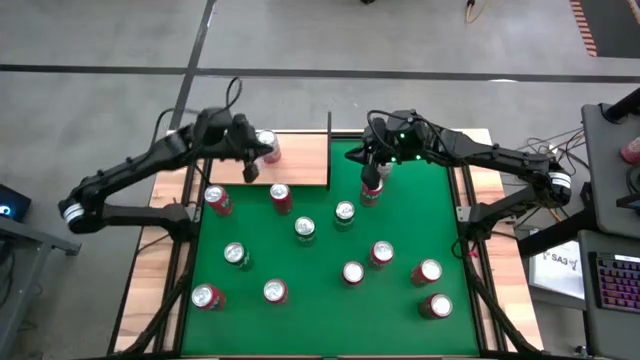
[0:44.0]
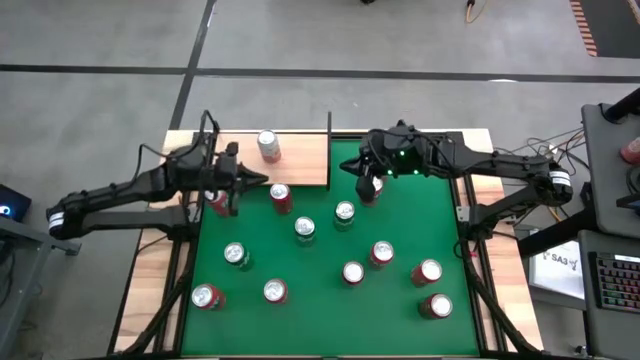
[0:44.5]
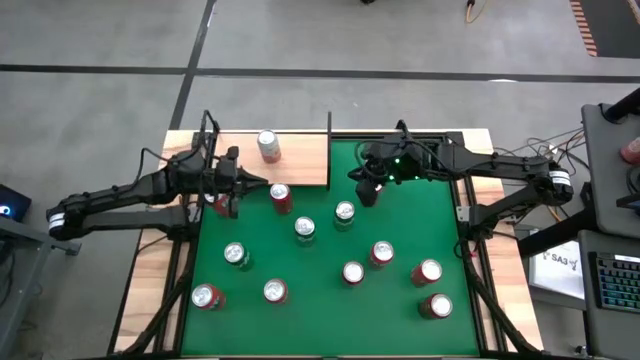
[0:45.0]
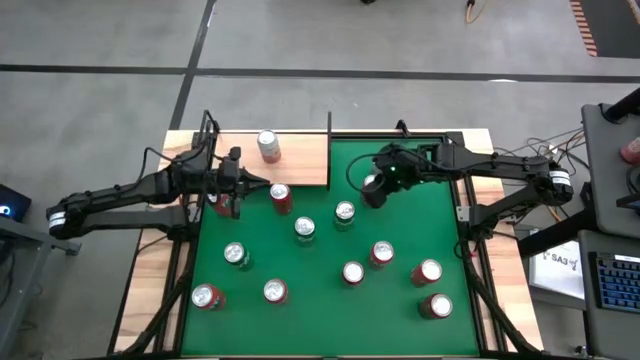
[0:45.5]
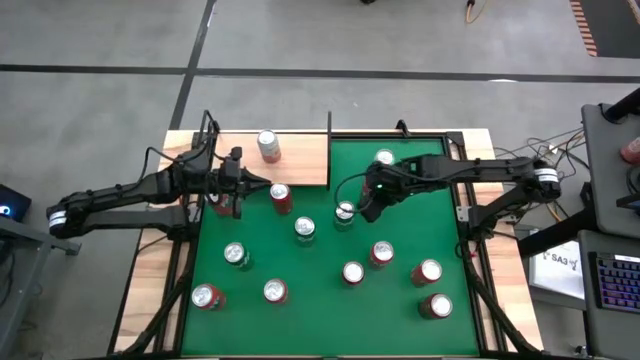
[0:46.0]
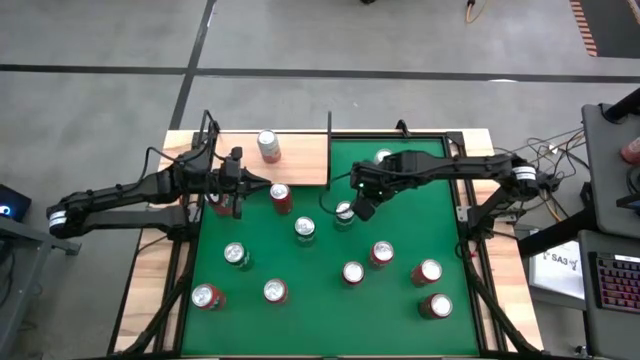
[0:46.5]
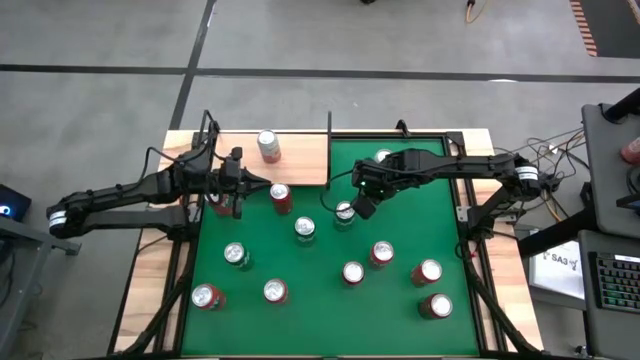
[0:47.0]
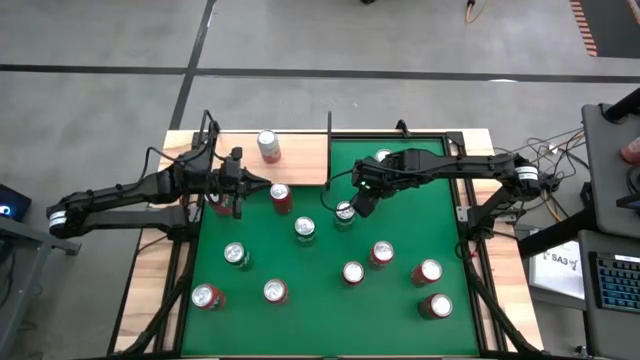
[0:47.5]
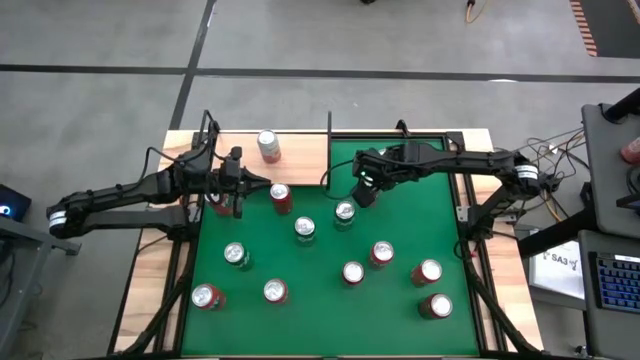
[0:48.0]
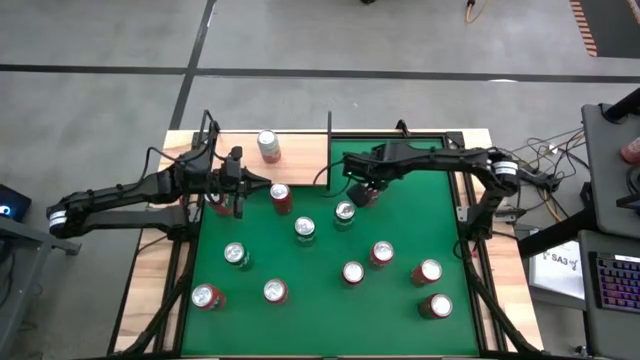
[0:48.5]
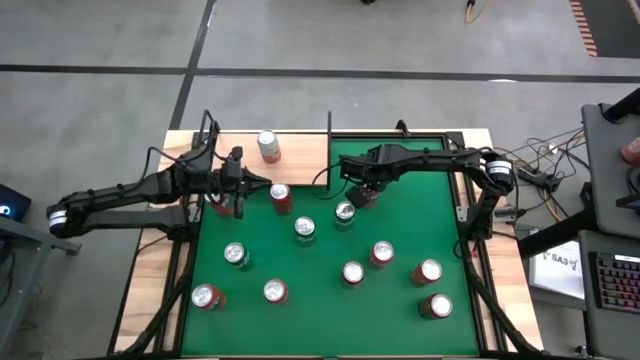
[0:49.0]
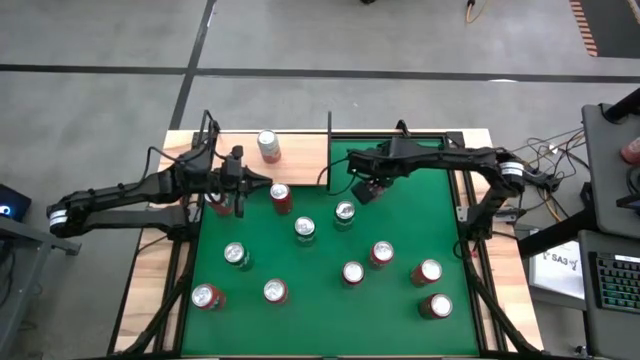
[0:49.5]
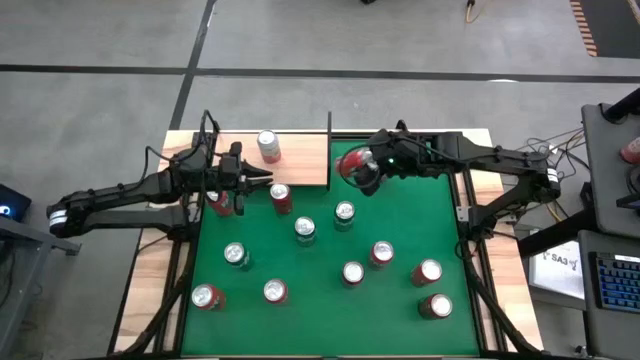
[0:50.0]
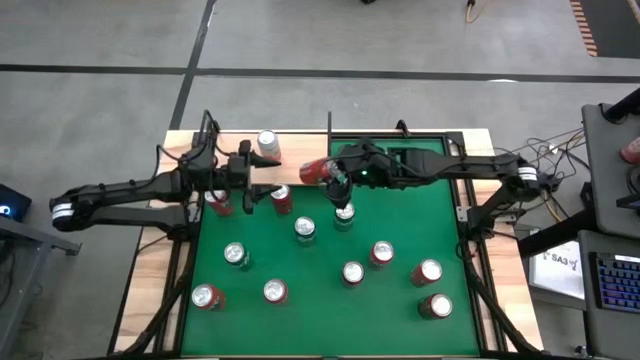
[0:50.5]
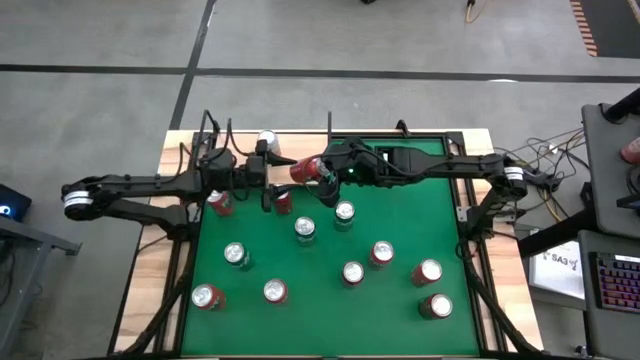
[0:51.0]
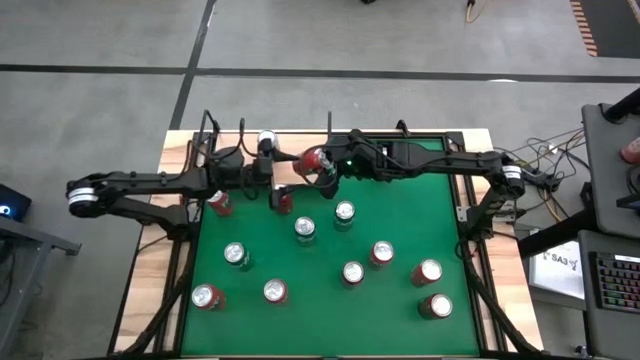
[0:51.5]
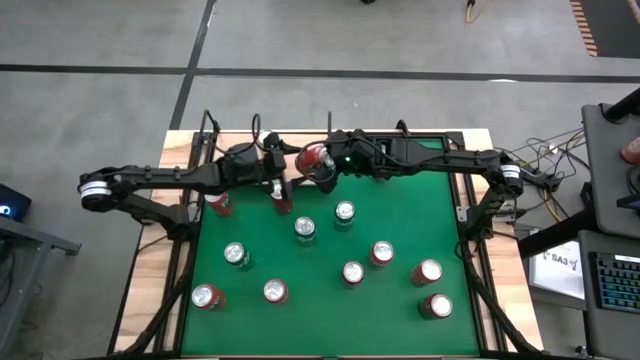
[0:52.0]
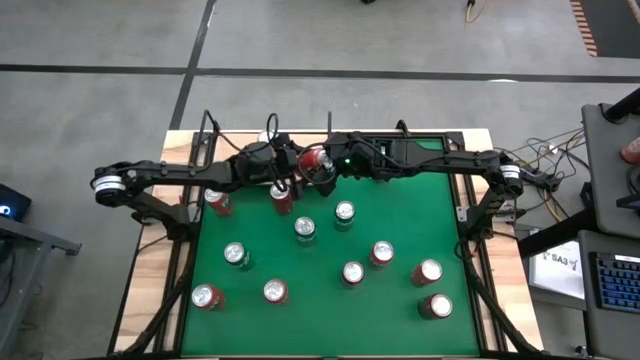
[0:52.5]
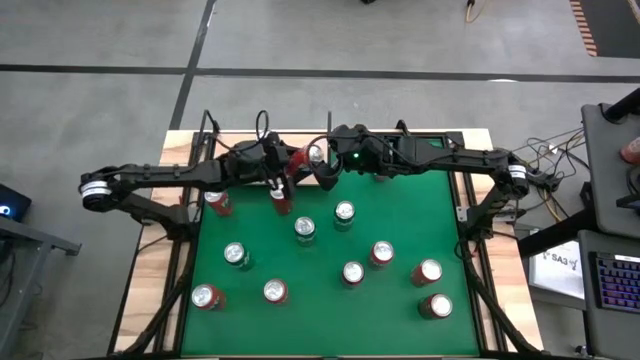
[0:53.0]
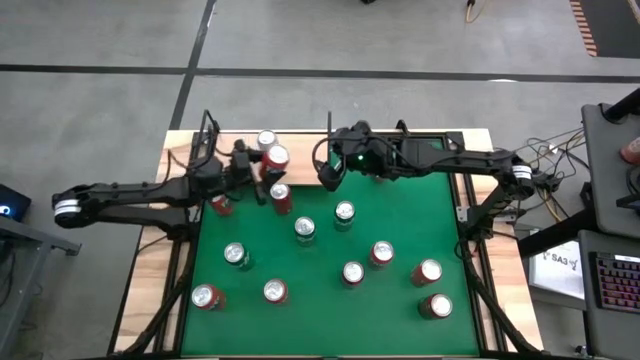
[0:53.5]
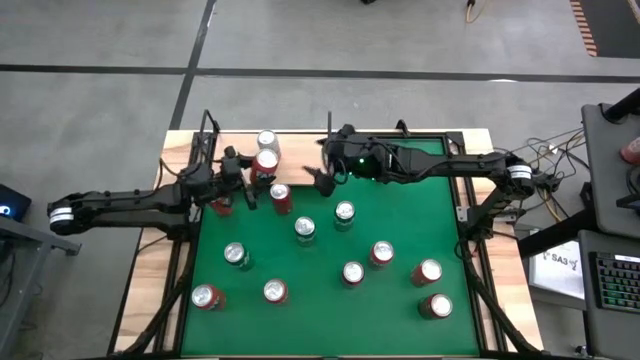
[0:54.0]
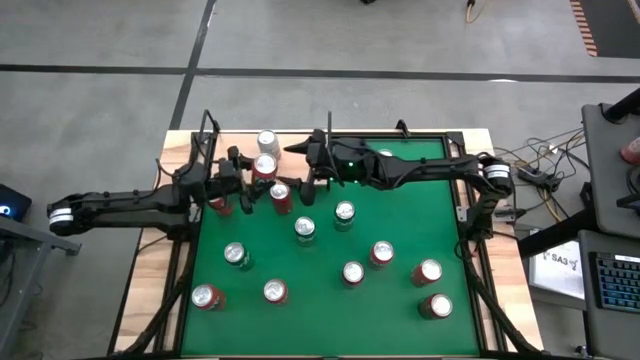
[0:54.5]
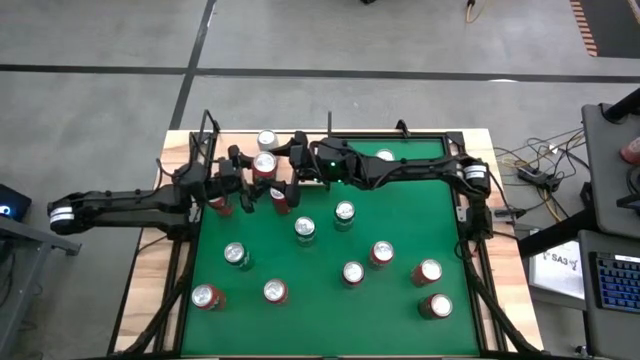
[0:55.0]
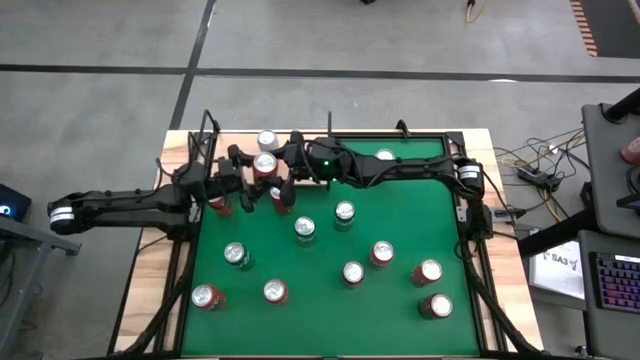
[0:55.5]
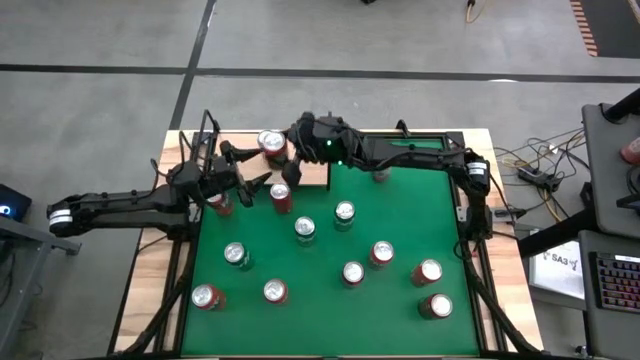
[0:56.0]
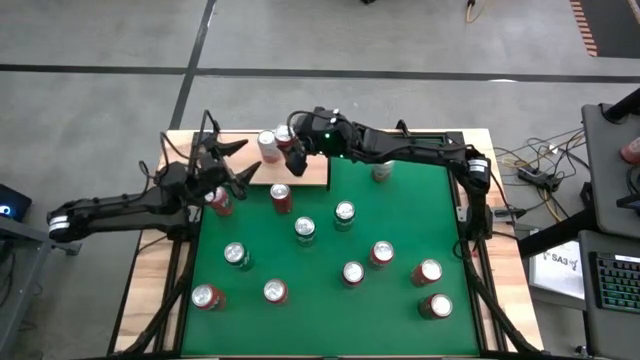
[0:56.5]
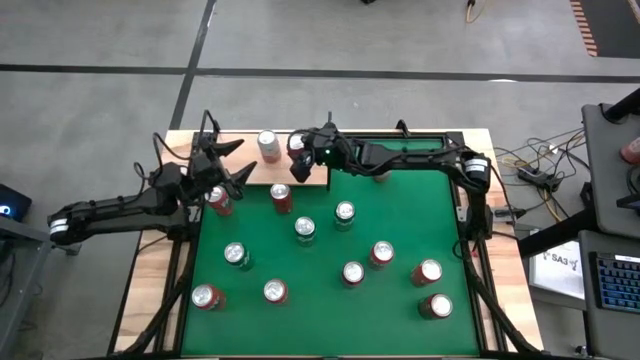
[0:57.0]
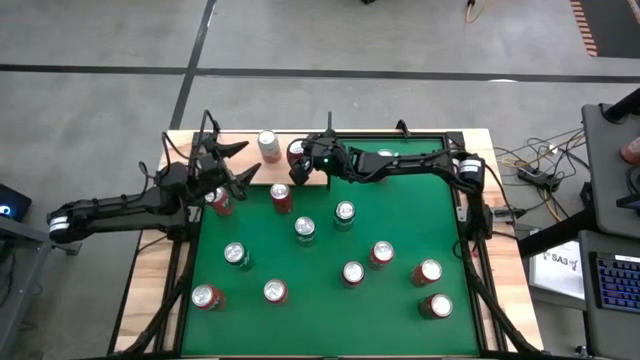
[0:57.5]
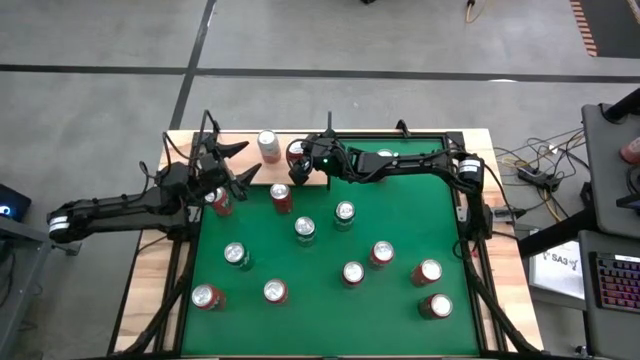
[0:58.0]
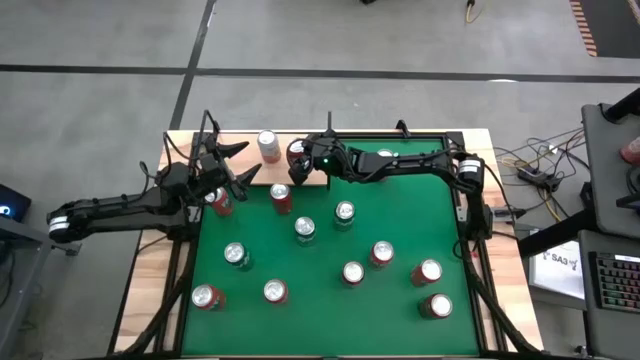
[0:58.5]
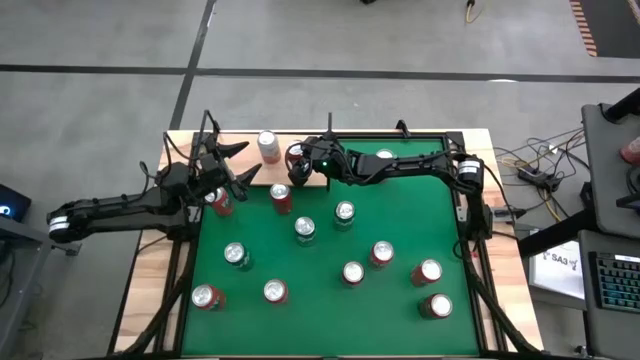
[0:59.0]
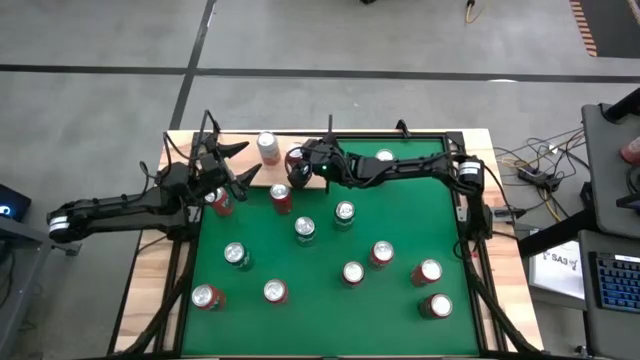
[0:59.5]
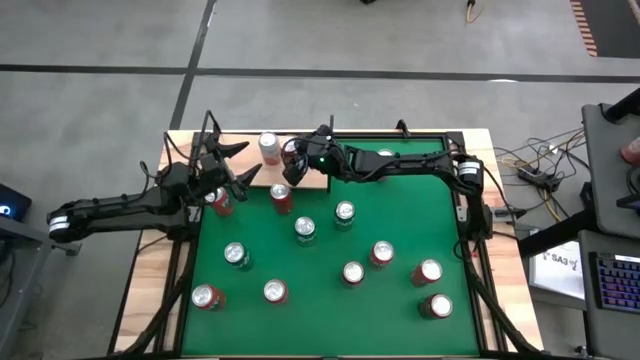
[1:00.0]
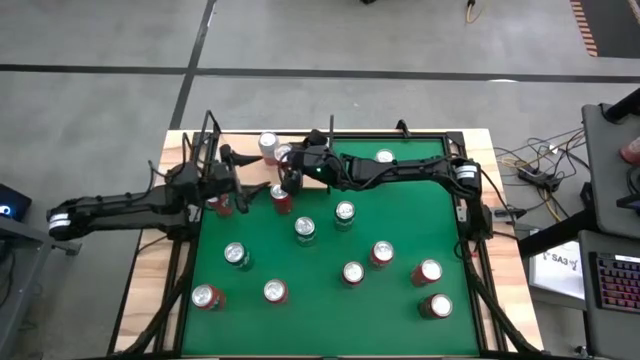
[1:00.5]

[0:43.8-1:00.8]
Task: Place canned beverage on shelf
Put the red soda can on the shelf
